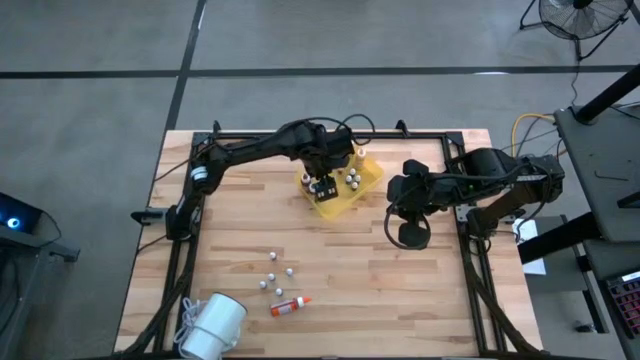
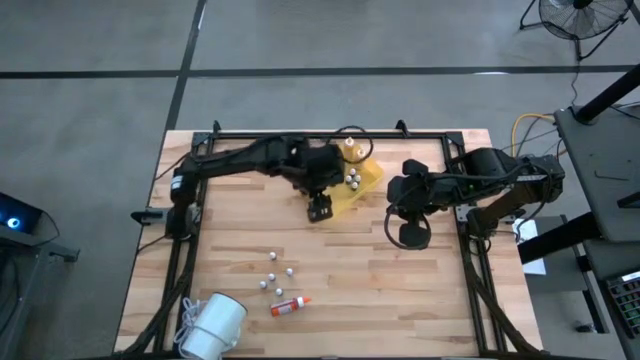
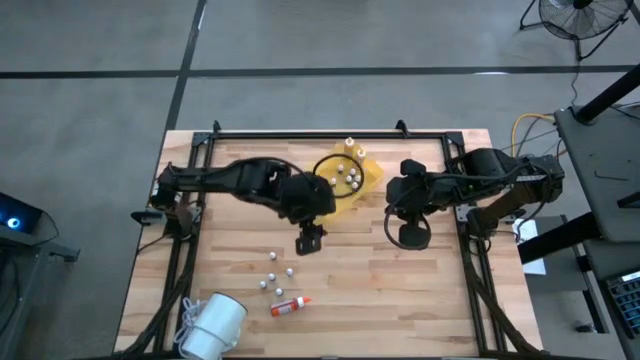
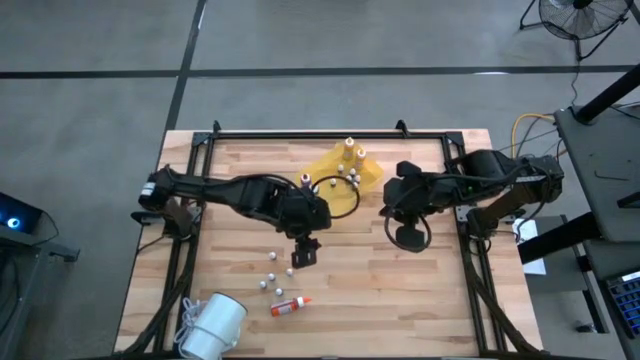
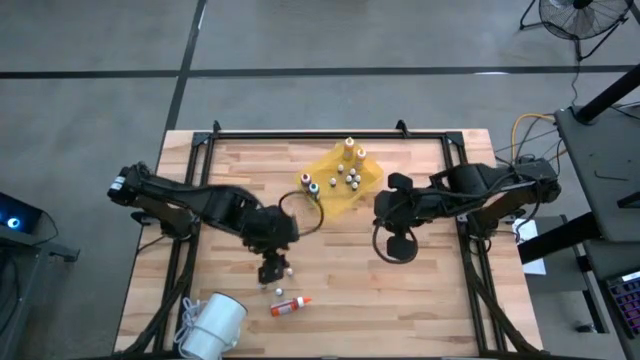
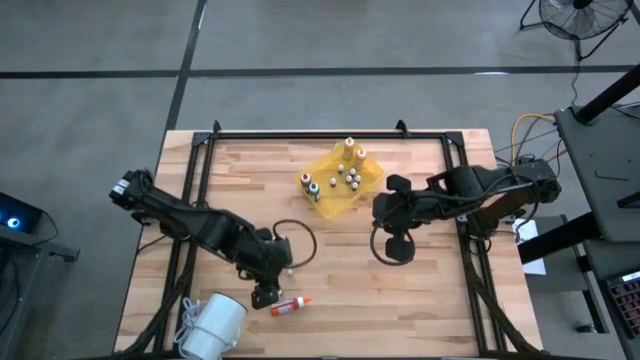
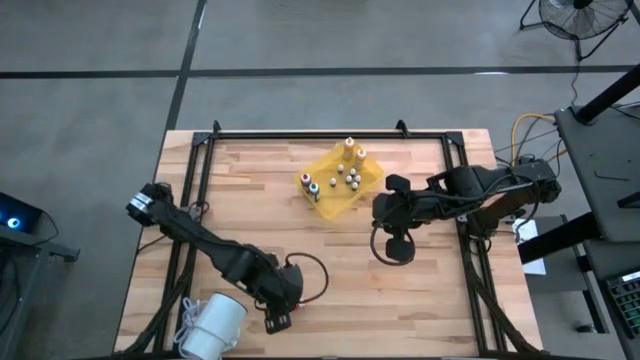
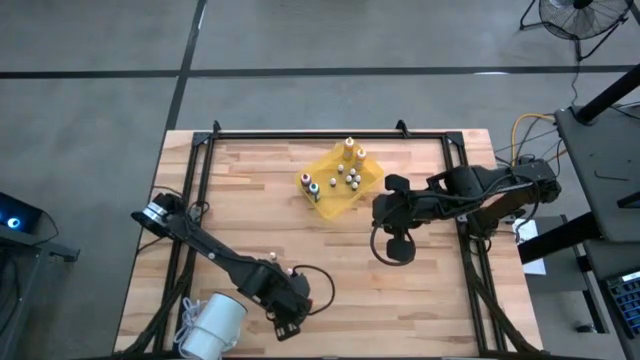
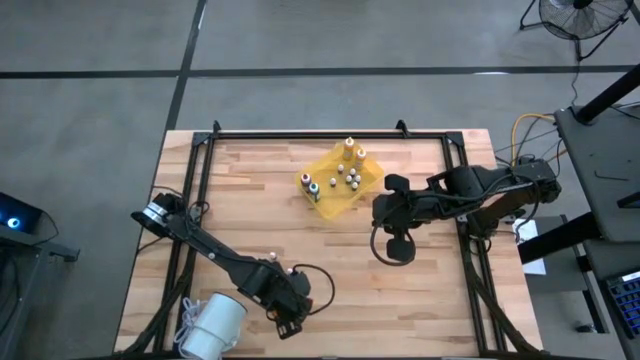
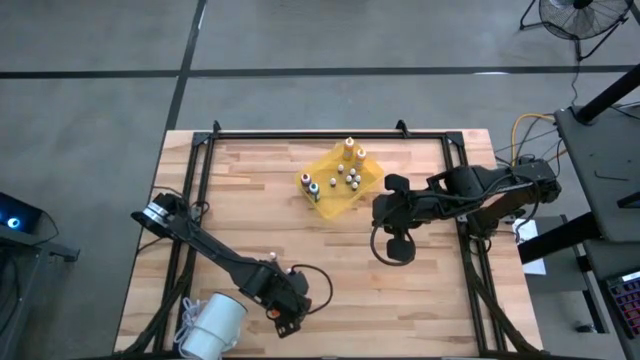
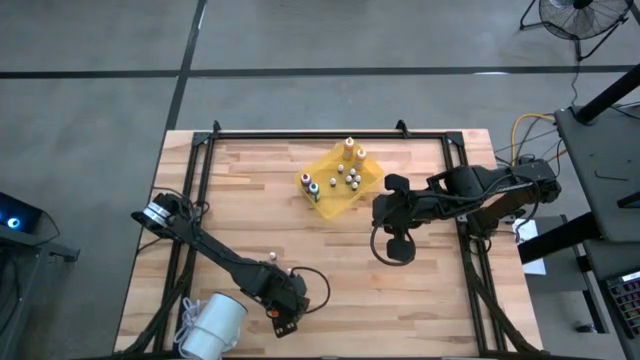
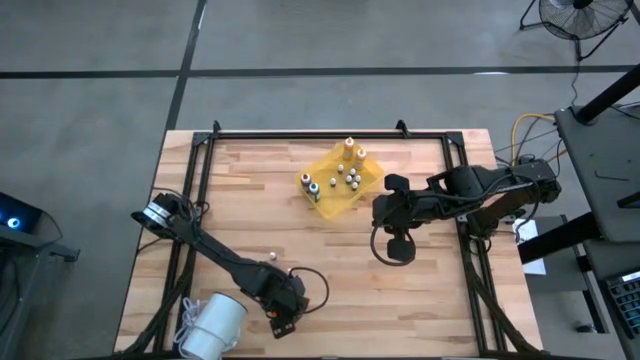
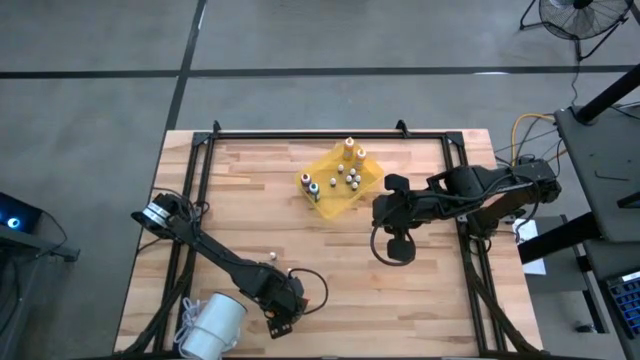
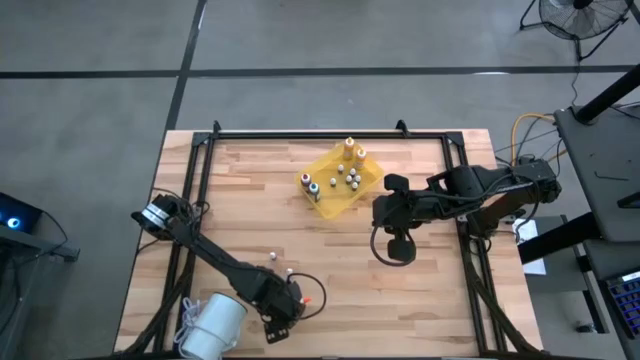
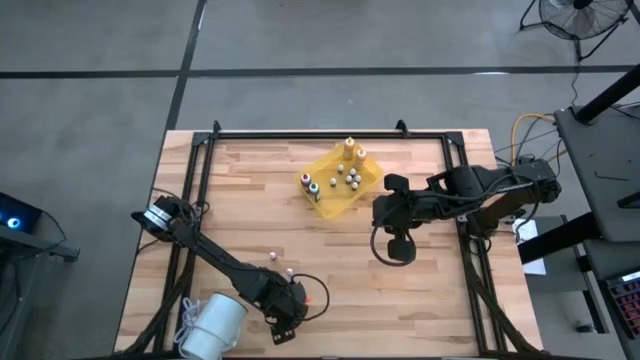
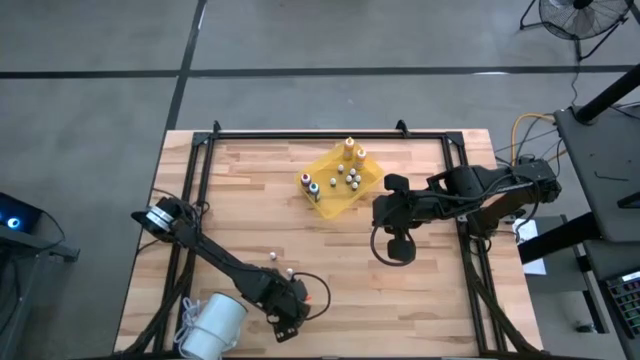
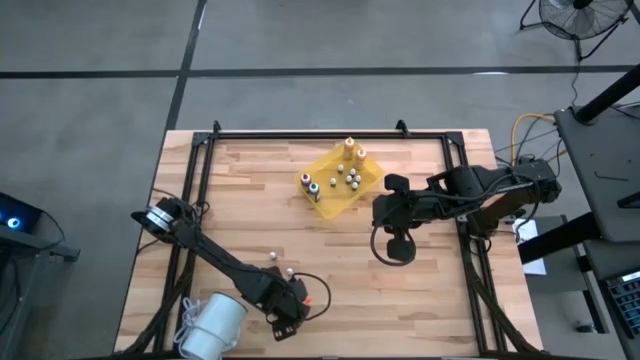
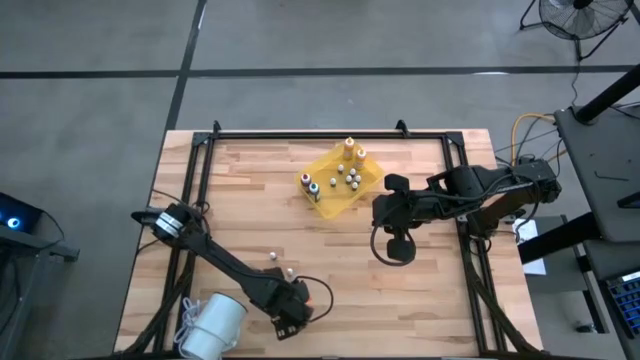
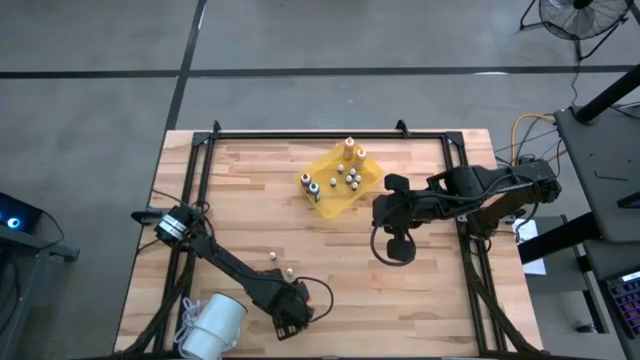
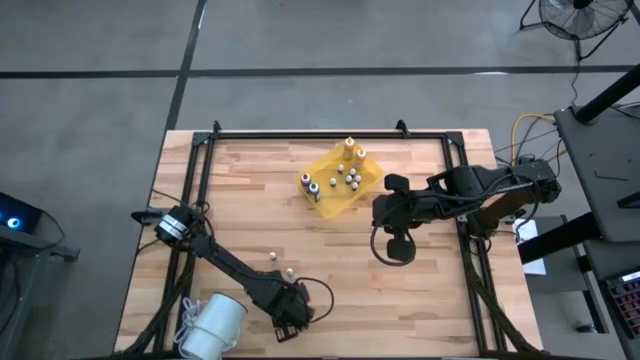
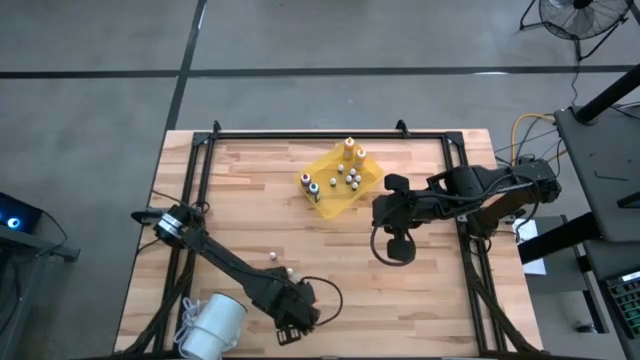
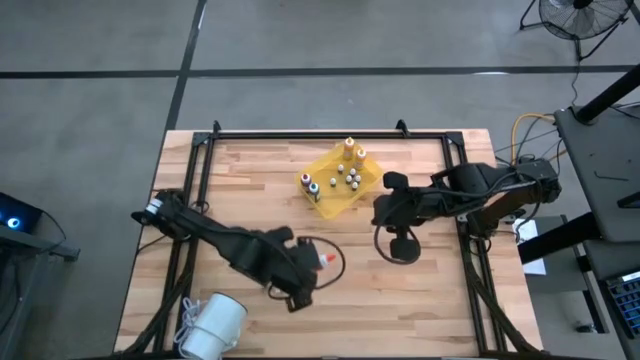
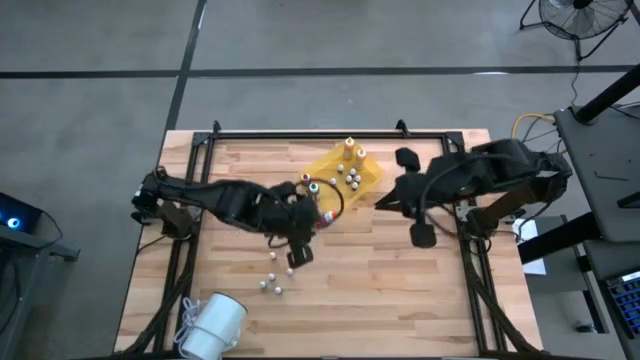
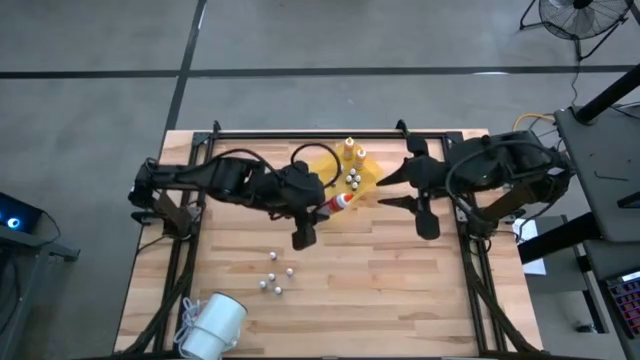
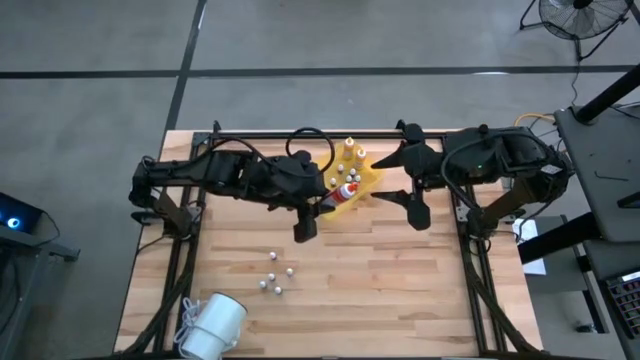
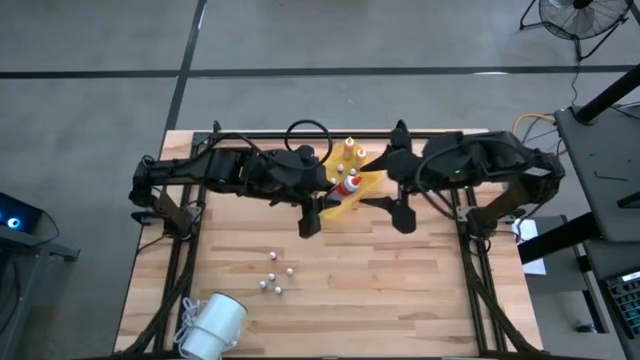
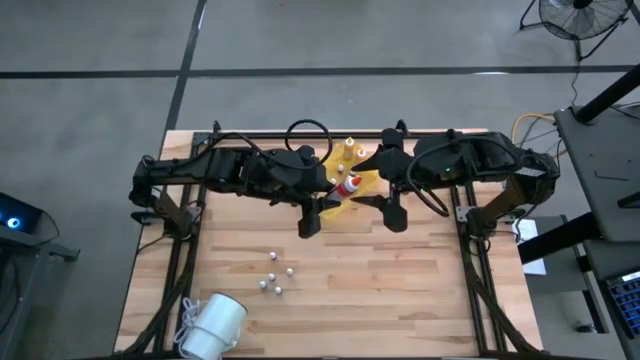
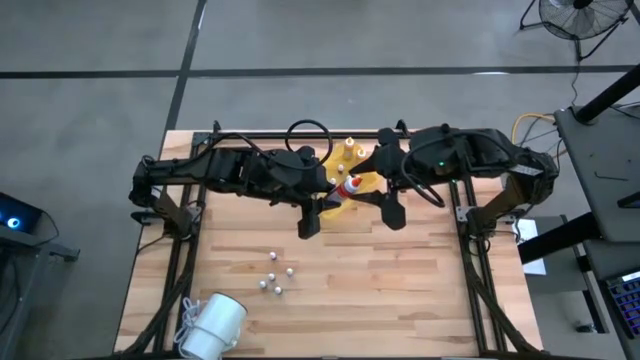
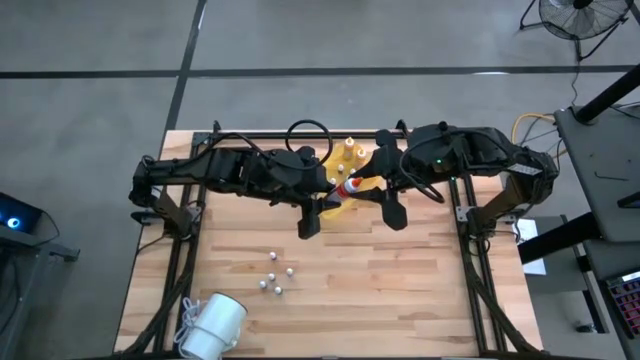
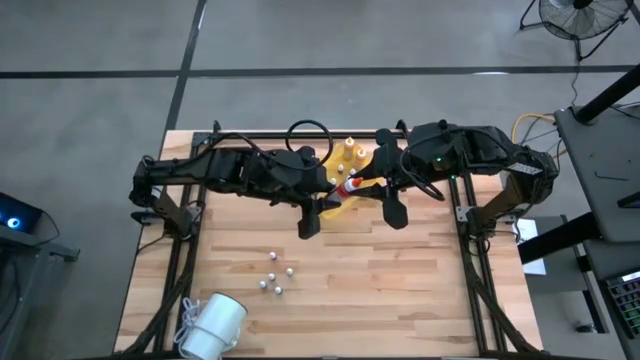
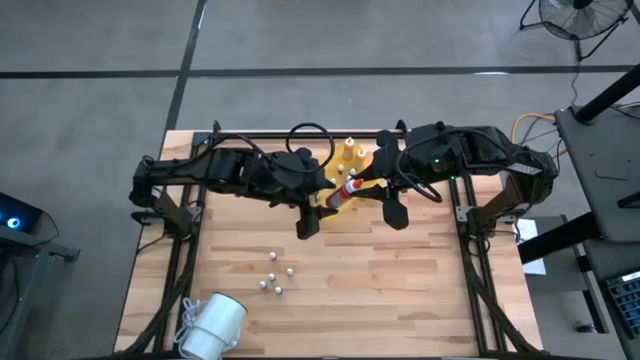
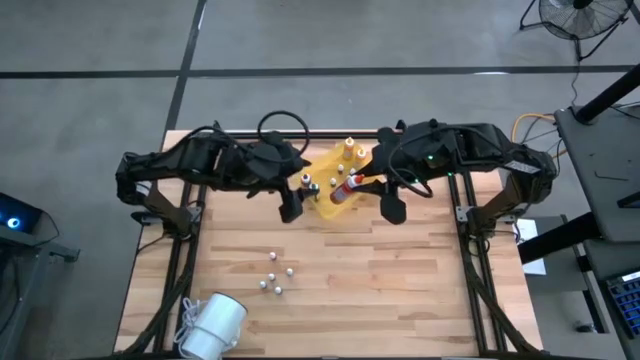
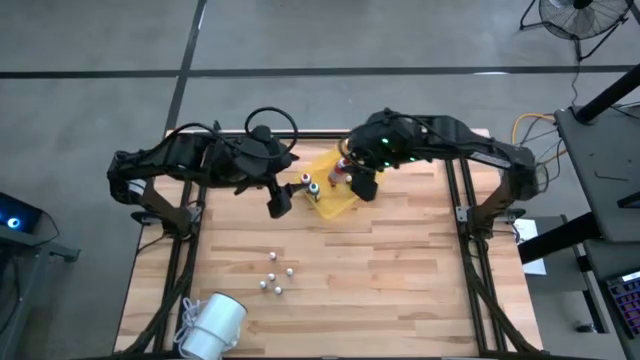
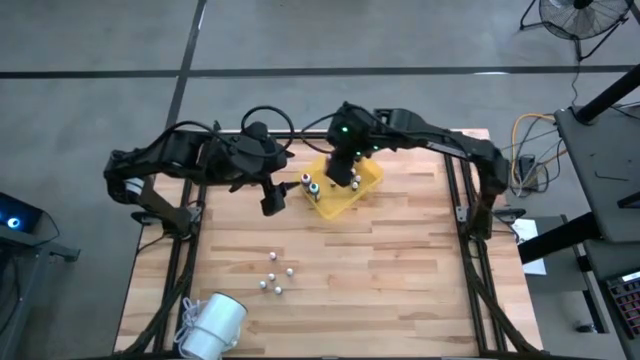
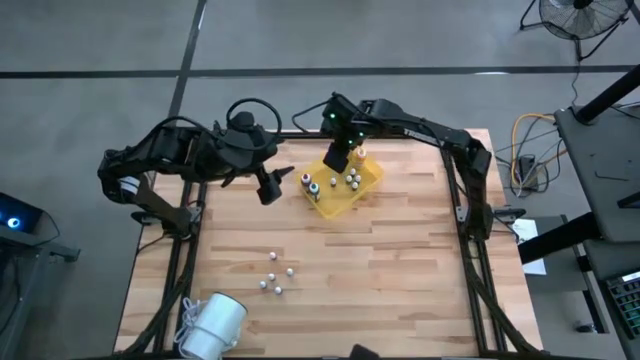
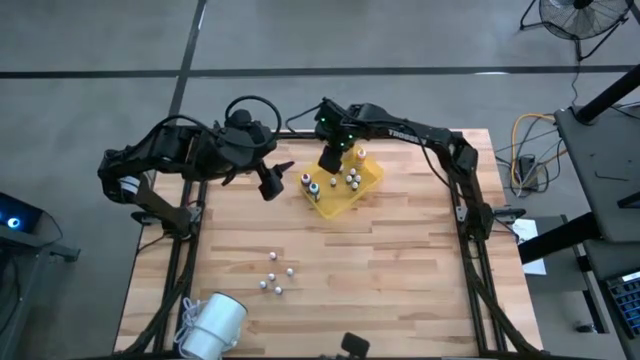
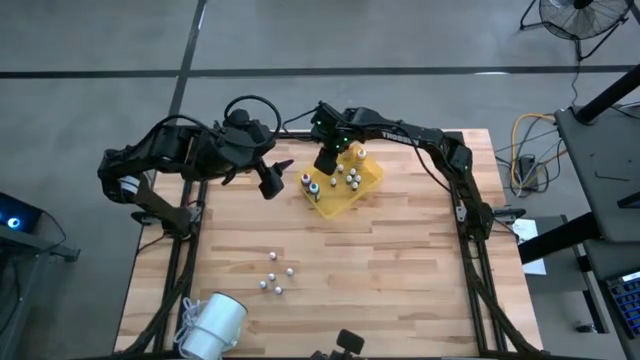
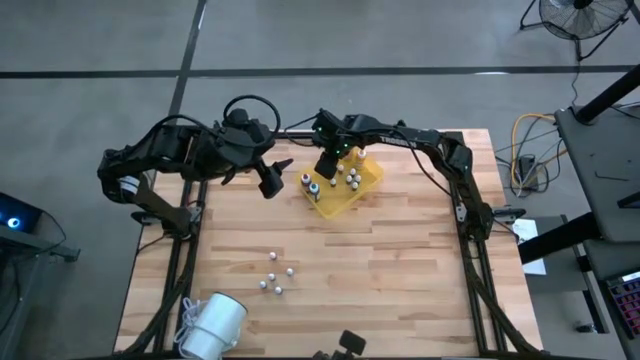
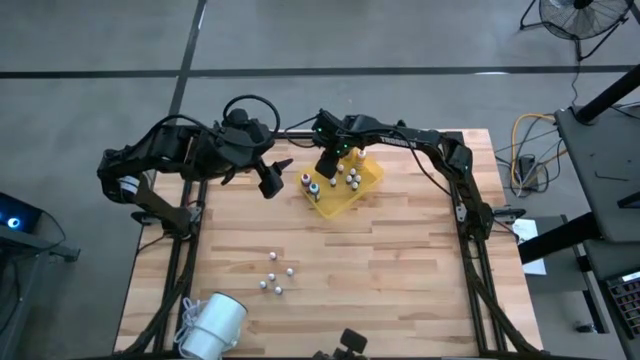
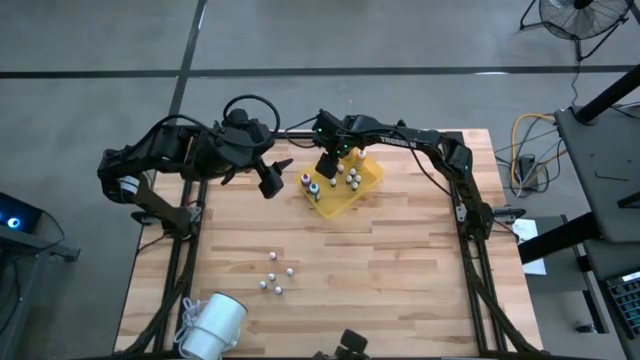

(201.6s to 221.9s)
Task: Pick & Place food coloring
Put the large orange food coloring bottle into the yellow bin
